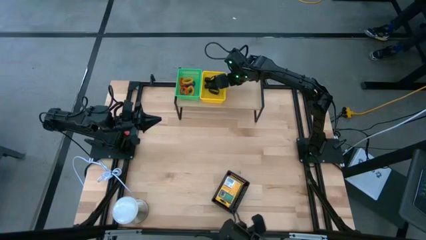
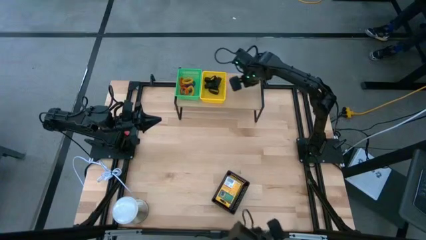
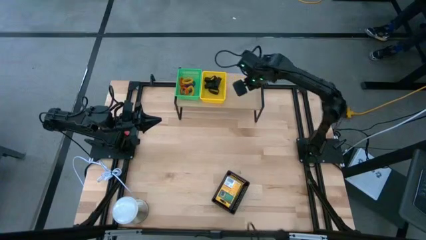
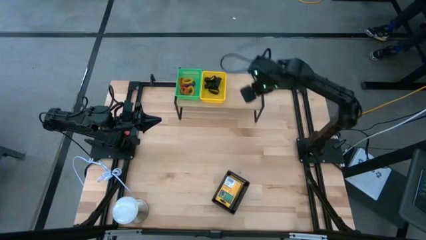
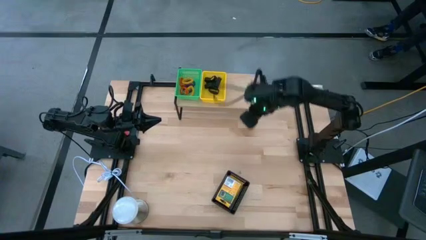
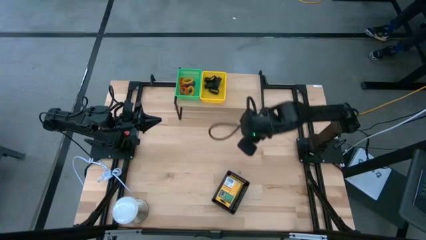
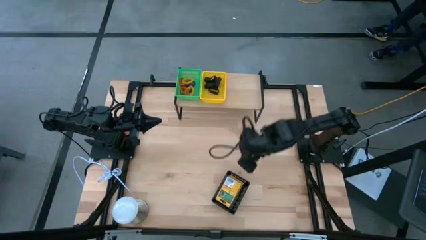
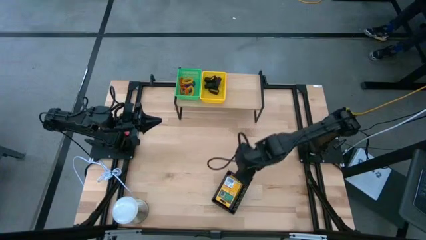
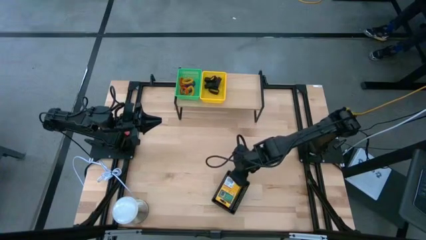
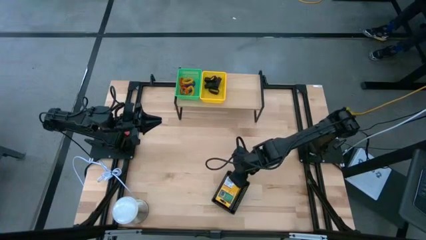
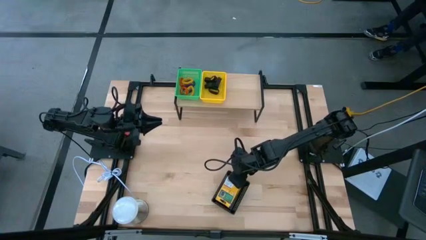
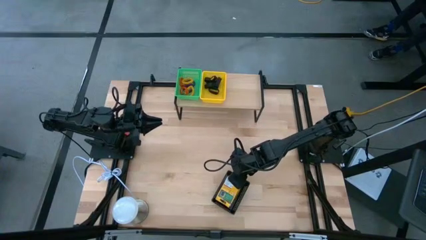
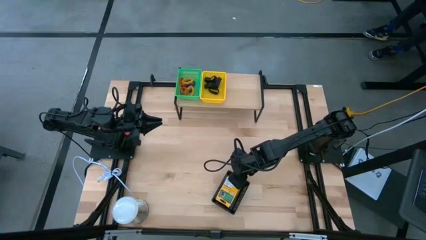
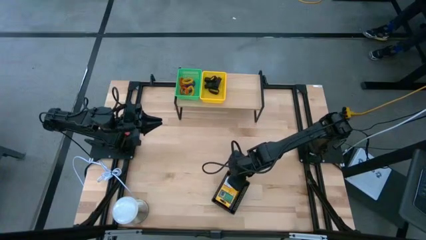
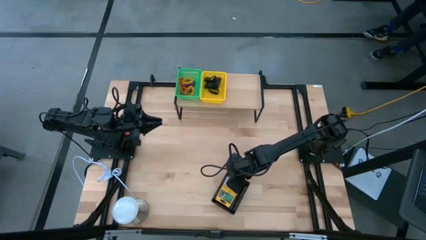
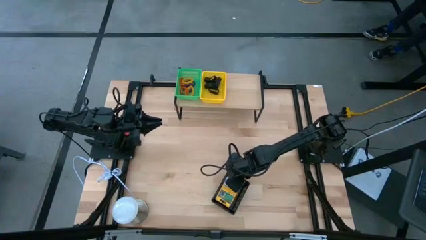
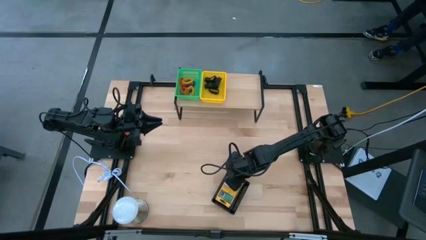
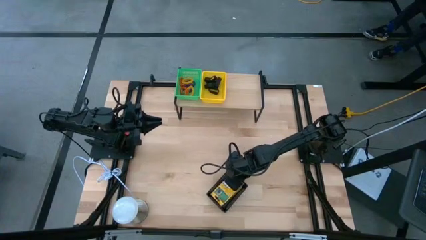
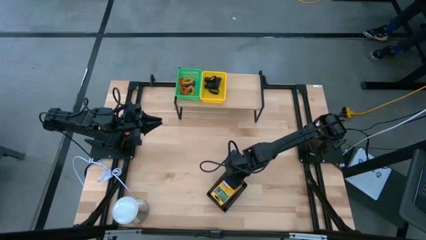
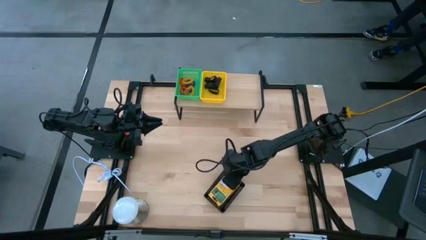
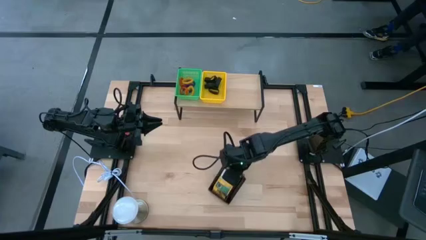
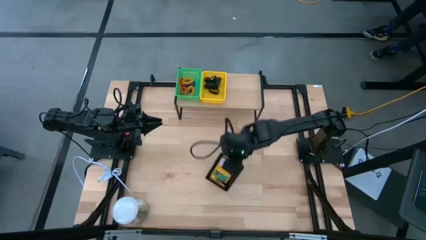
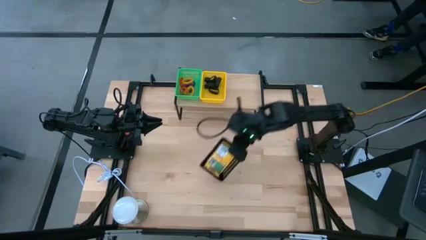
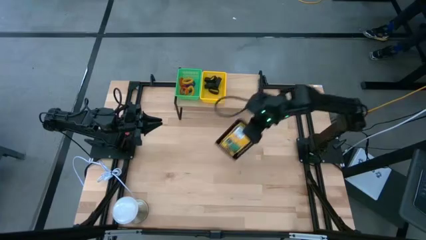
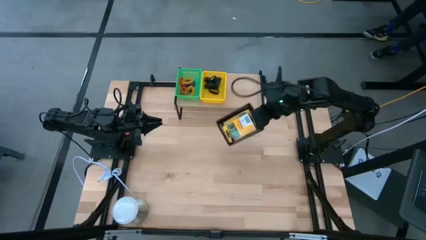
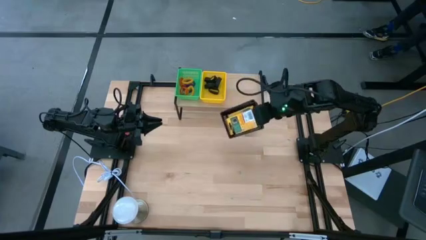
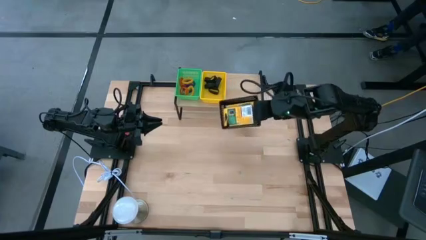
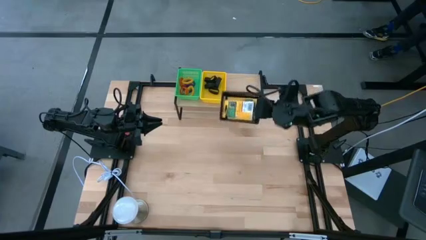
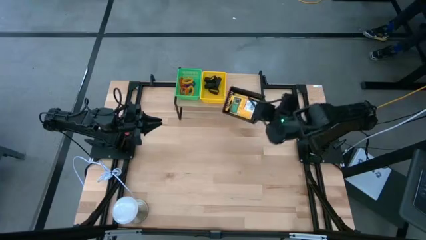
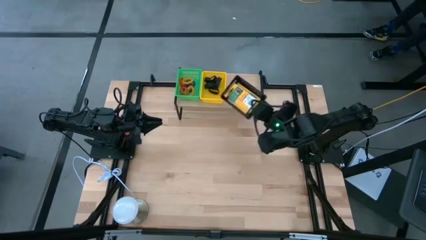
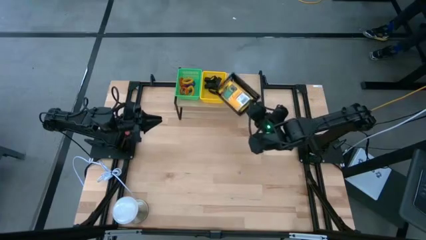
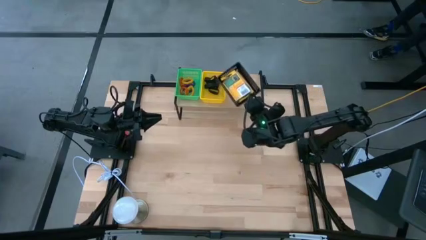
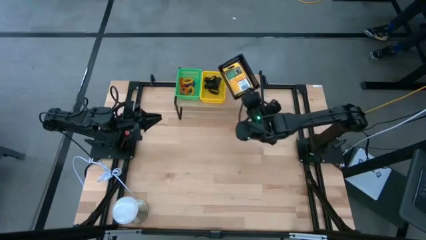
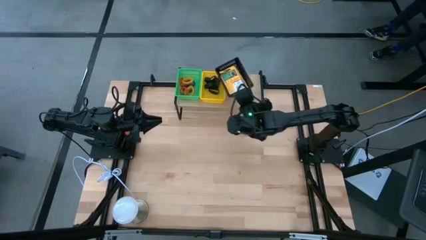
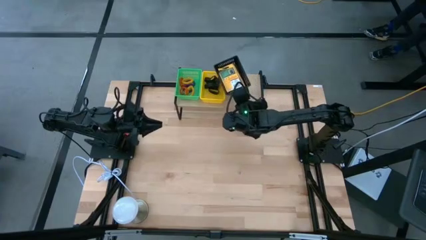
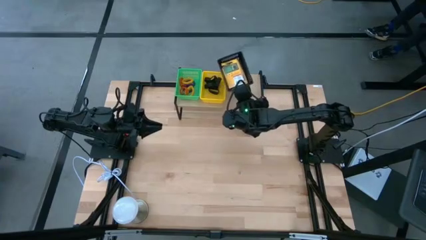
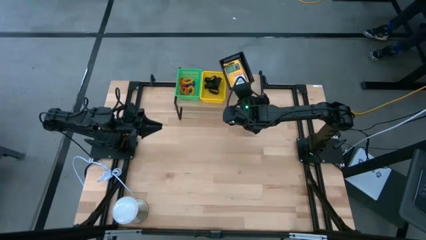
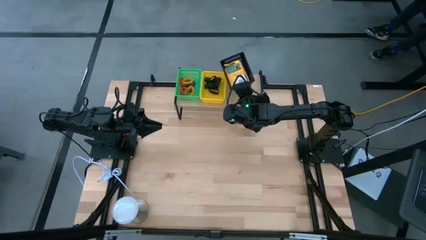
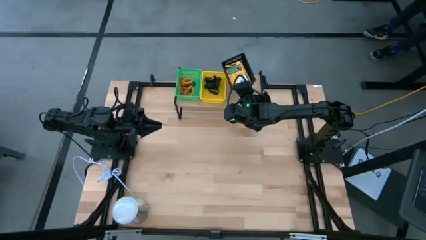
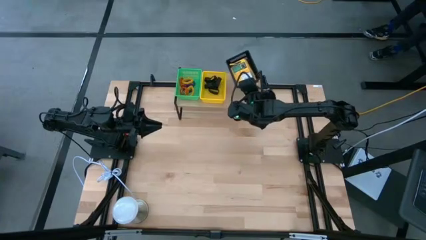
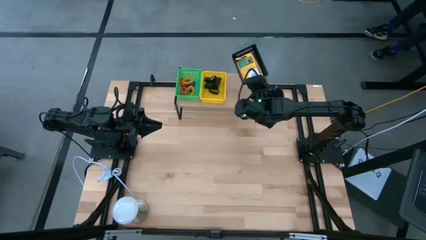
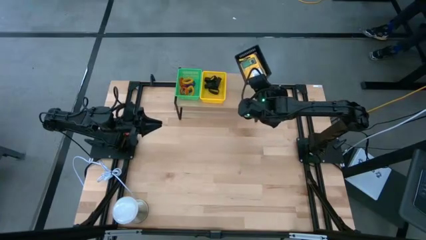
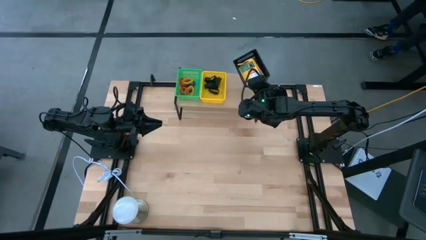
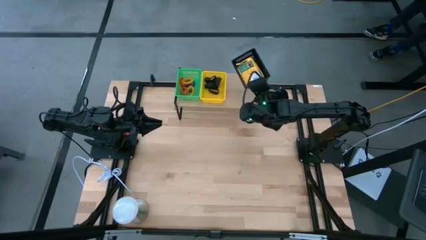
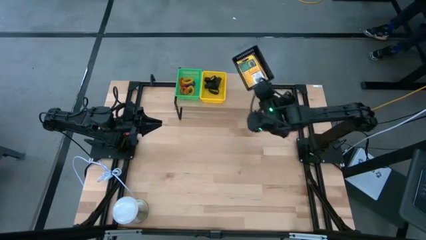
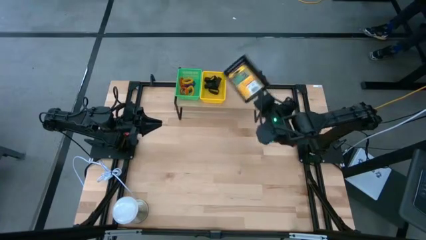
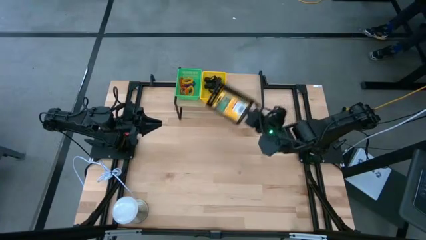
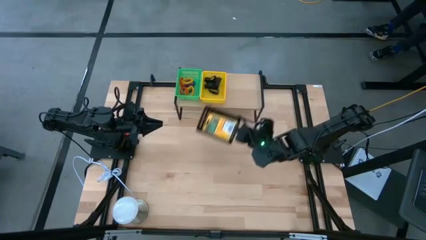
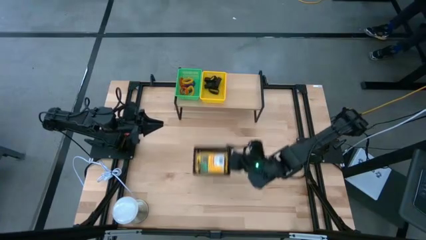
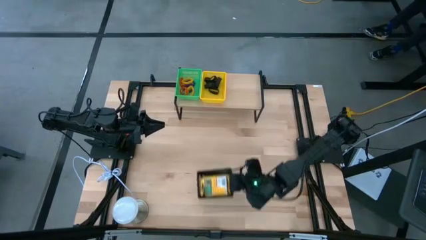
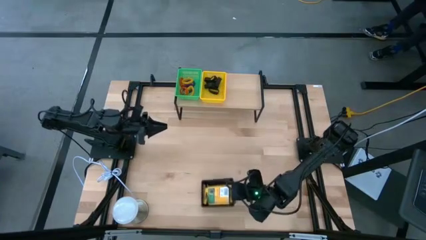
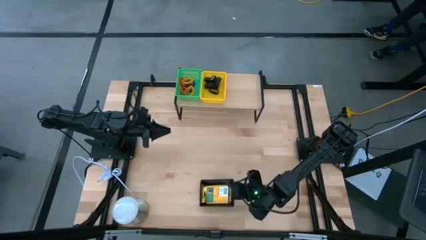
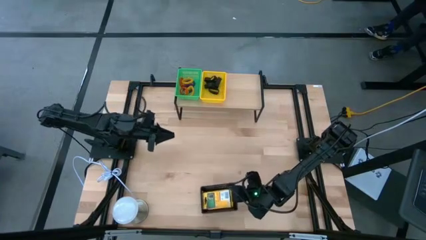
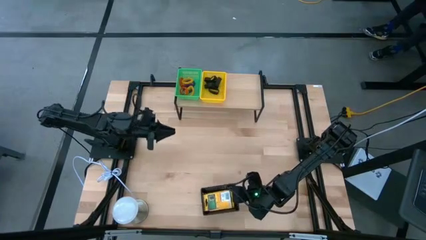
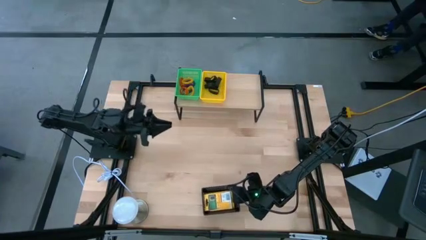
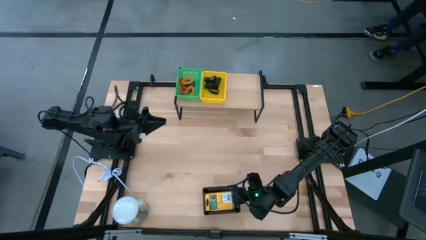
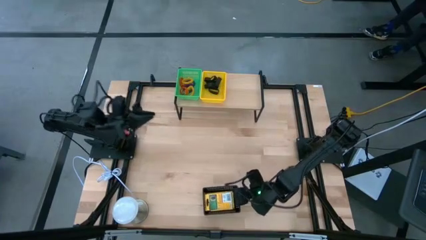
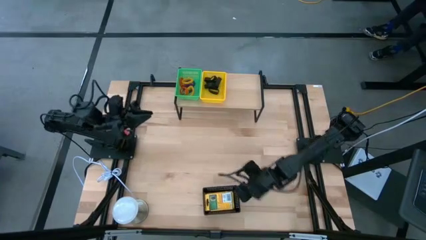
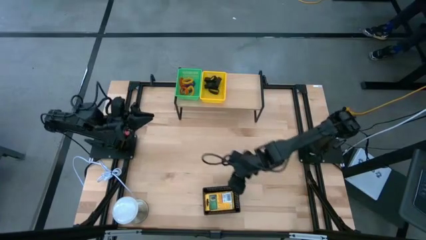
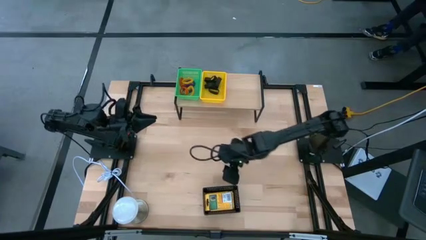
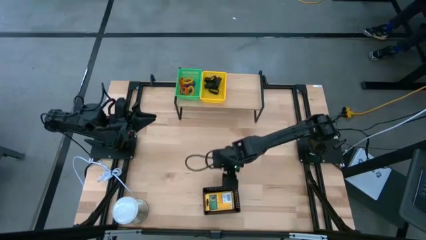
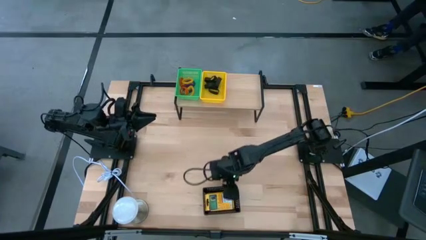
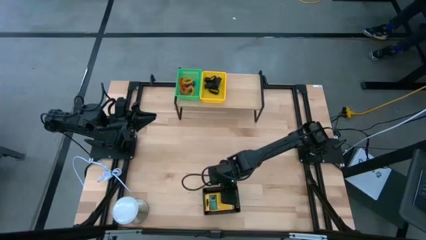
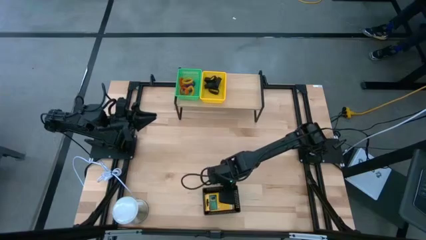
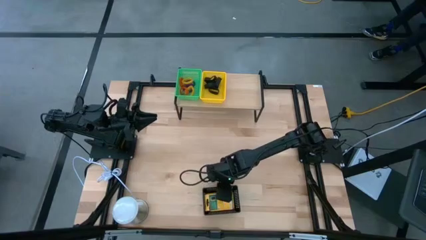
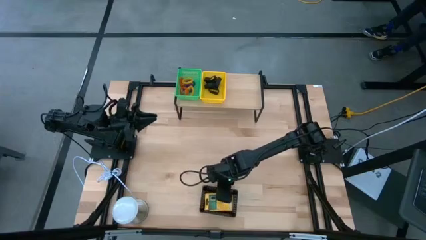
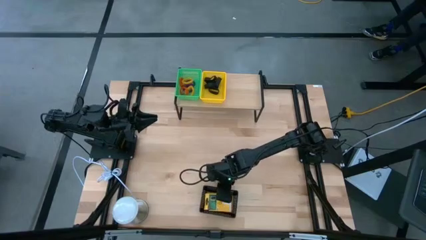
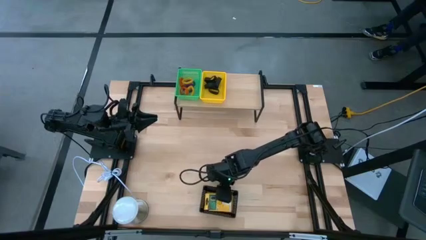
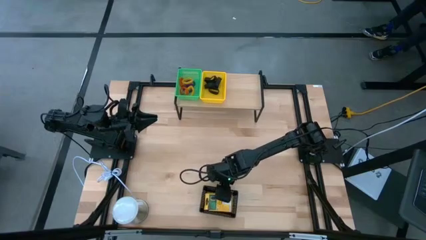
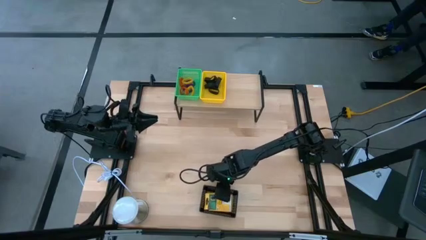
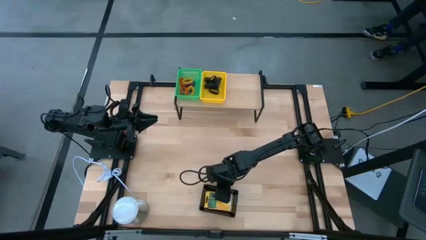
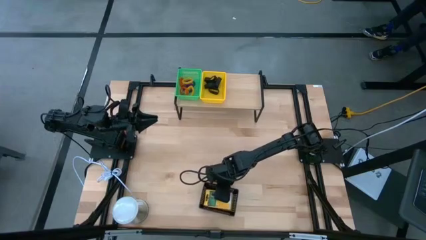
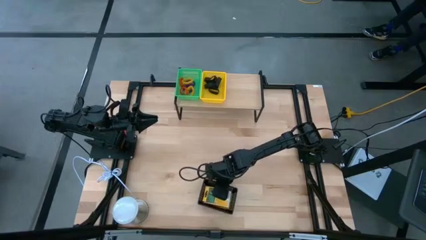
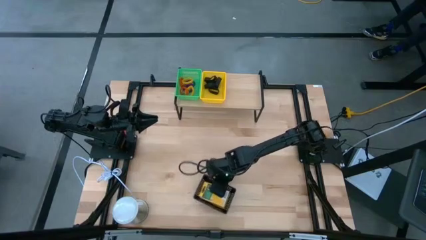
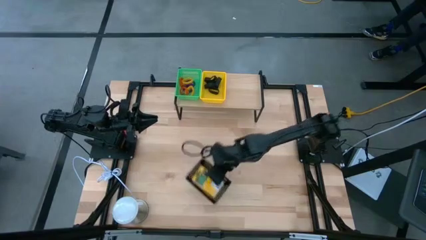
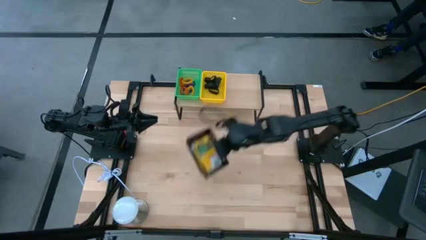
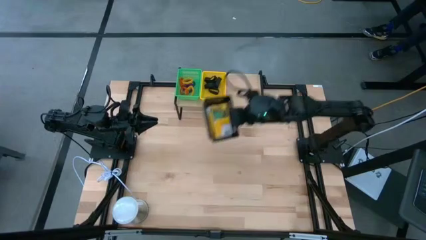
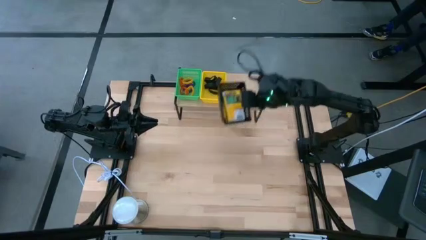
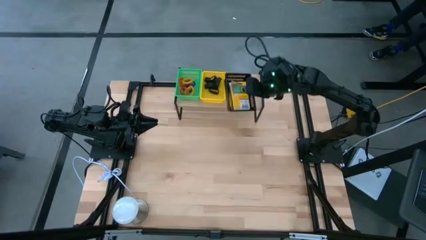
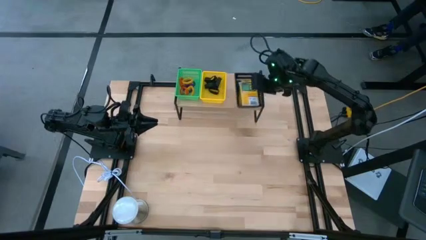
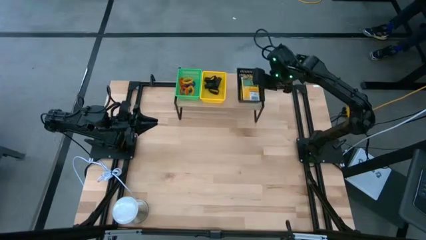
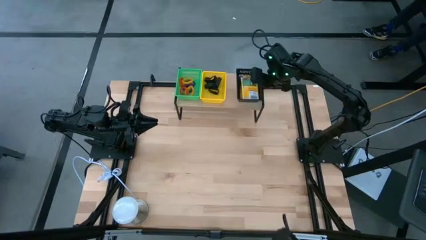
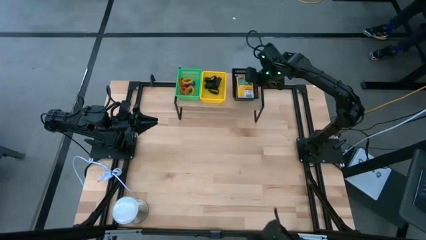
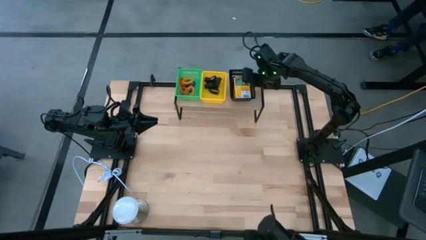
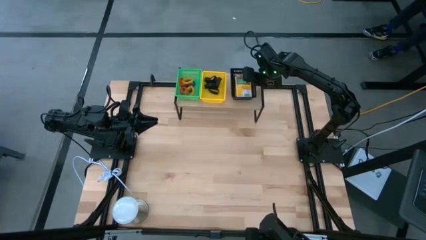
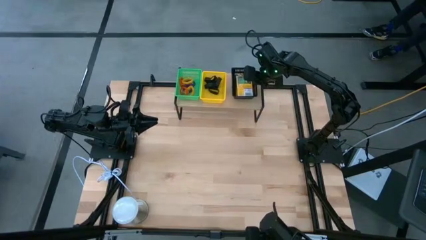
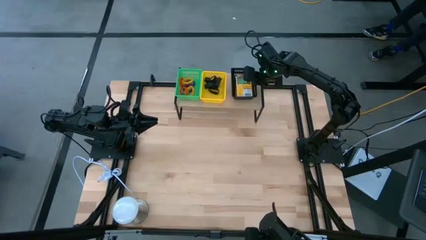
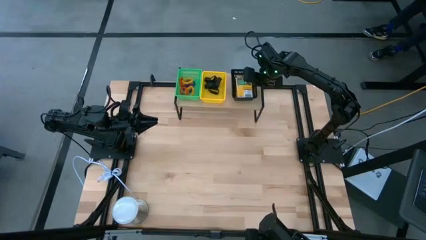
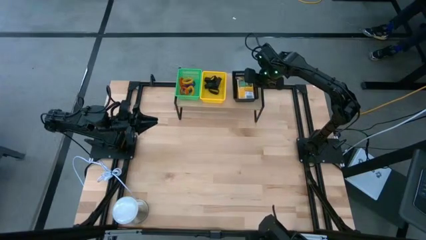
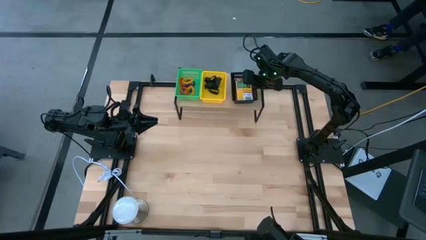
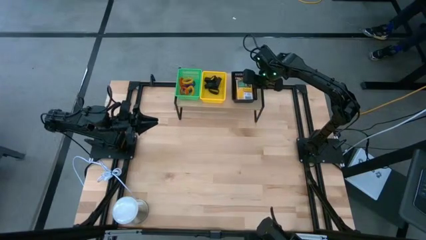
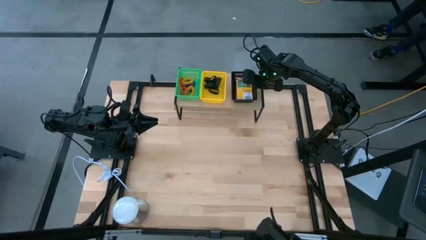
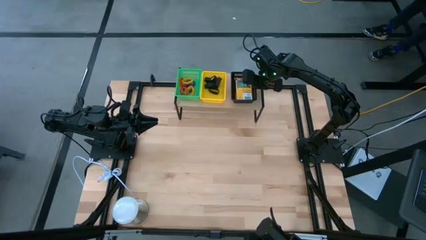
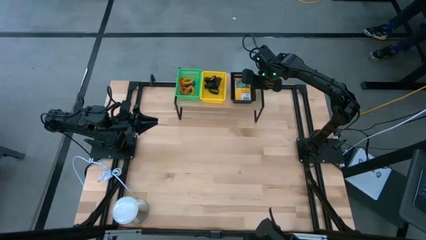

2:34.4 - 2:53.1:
Task: Pick & Place Office Desk Supplies
Put the black basket on the shelf
